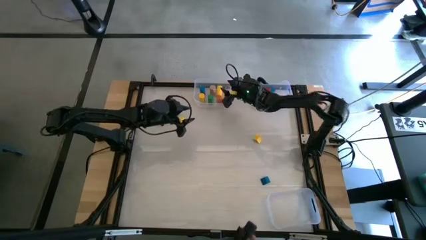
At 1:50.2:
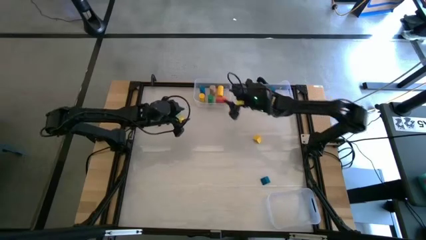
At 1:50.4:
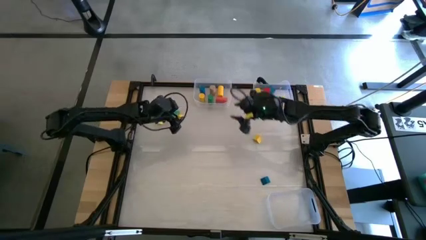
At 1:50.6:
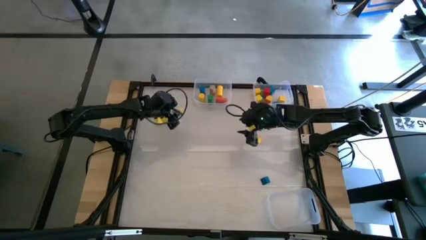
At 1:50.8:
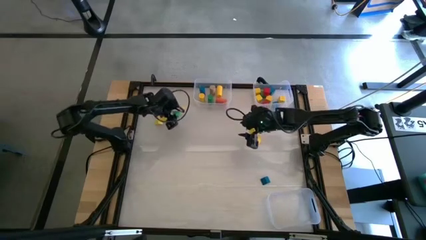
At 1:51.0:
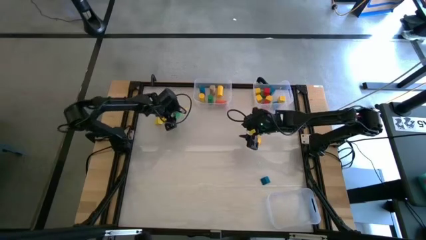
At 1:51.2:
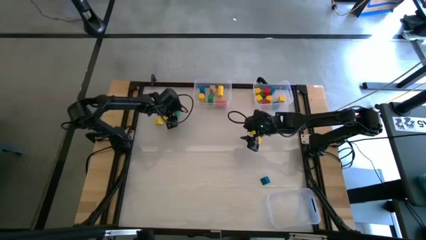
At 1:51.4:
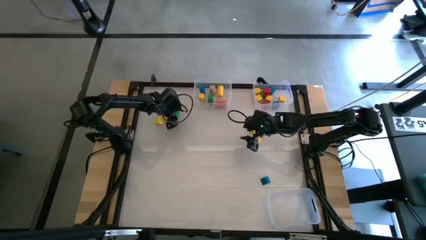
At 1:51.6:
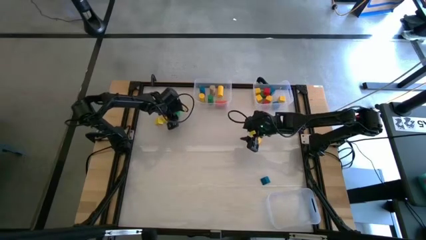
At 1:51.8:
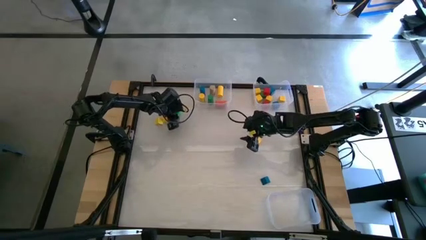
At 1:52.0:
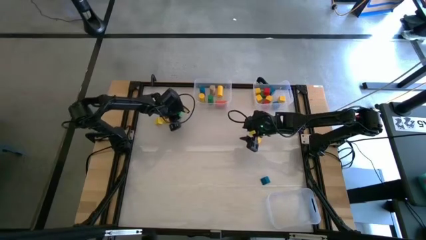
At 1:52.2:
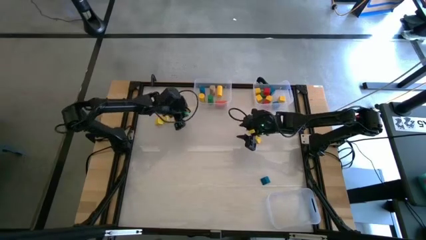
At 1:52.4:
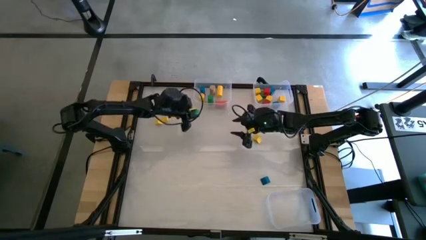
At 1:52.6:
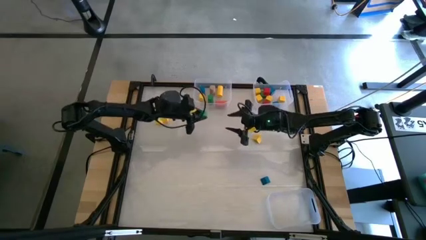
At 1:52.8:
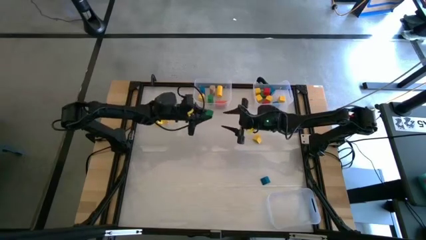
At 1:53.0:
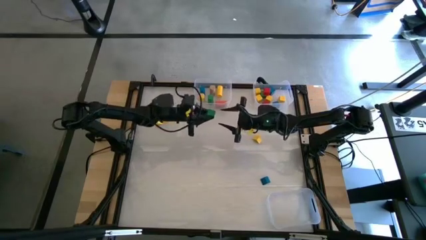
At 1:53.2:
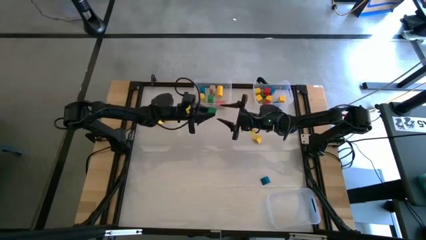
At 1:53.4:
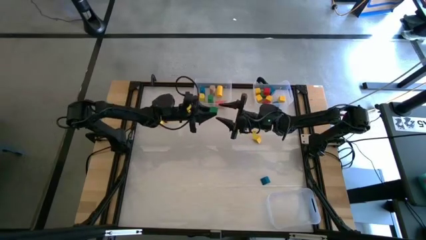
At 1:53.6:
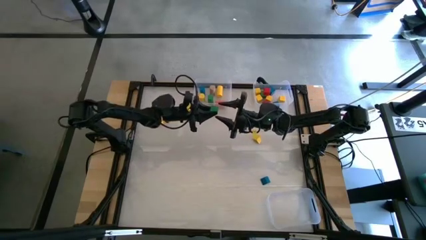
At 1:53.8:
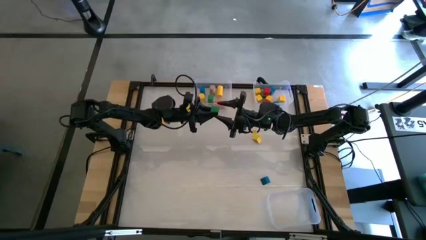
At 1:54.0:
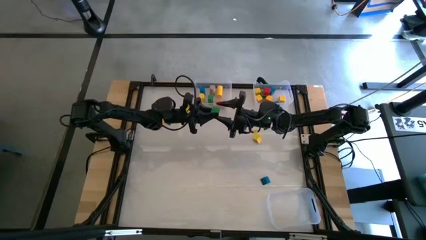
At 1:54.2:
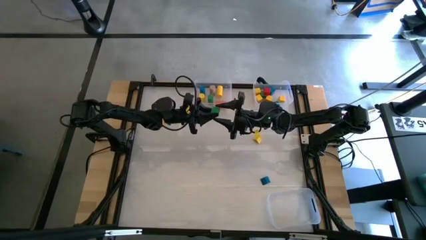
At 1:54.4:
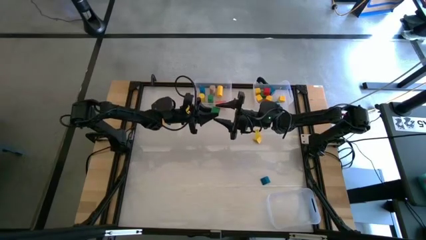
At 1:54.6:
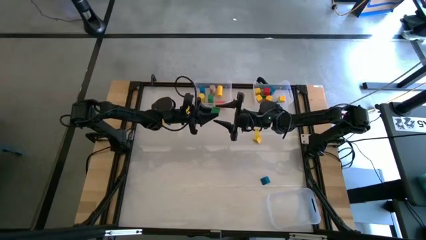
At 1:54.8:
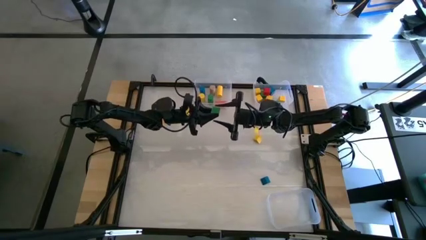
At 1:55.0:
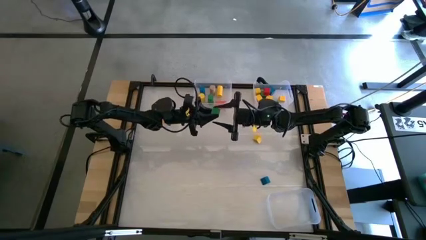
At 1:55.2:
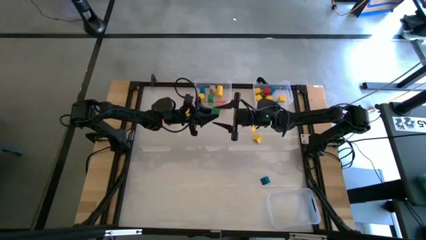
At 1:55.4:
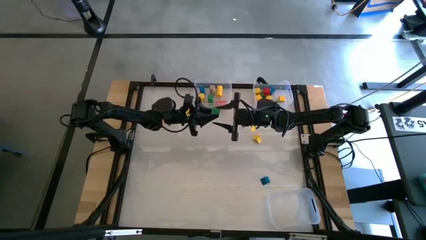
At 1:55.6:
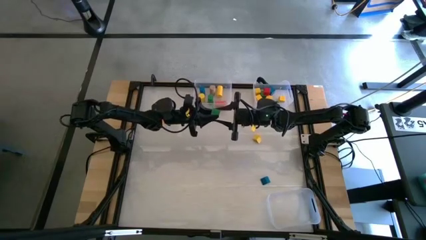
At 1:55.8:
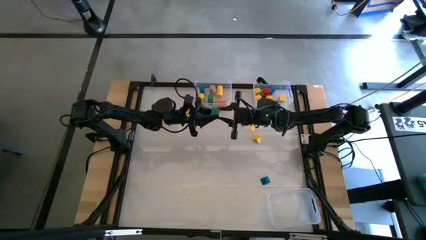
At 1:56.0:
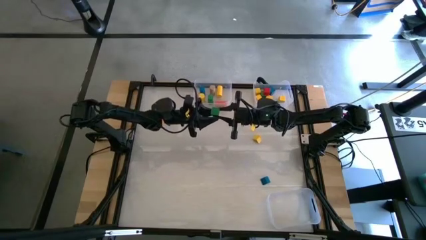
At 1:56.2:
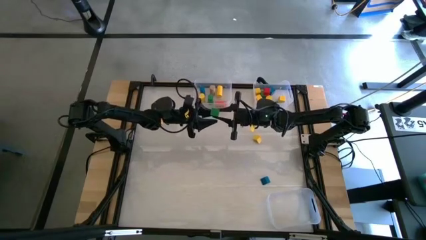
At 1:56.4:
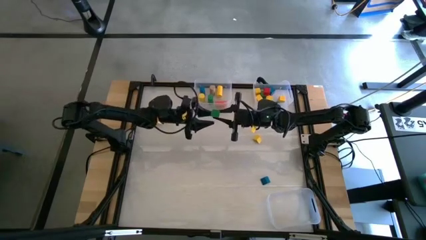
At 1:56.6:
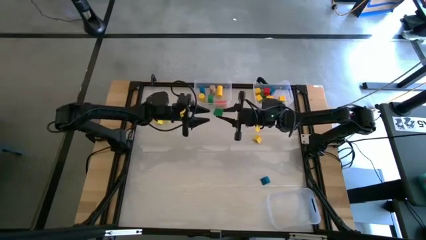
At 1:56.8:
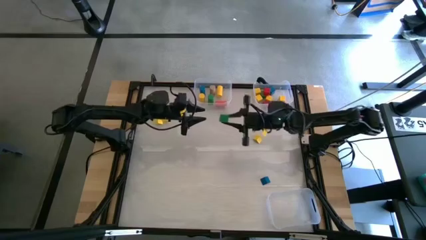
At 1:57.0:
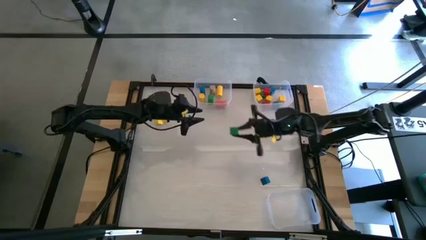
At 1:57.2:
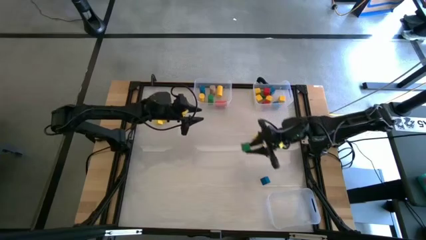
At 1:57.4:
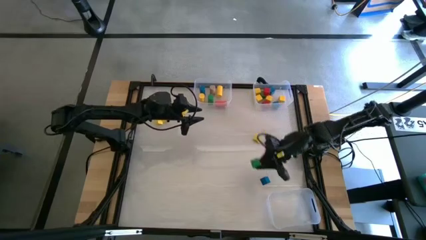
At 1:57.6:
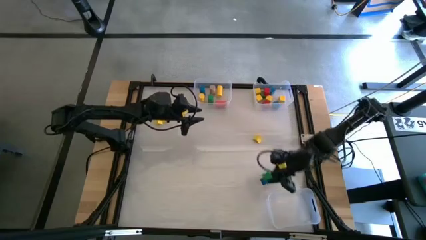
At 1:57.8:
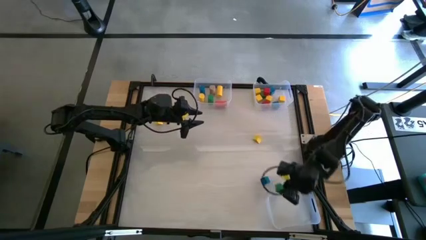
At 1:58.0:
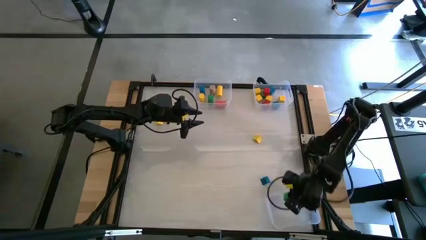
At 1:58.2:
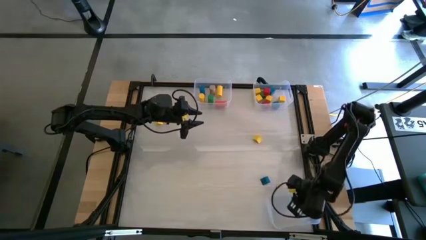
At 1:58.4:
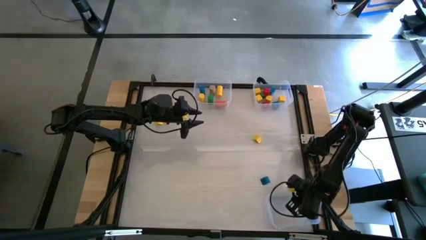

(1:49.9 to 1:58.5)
Task: Sort blocks by size
Put the green triangle block into the bottom transparent bin

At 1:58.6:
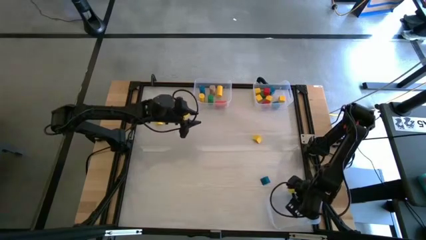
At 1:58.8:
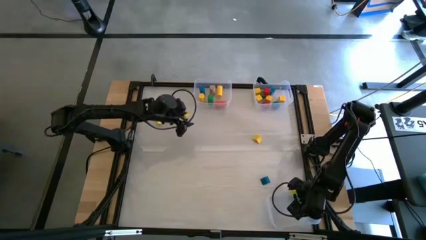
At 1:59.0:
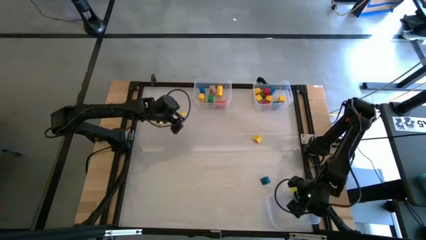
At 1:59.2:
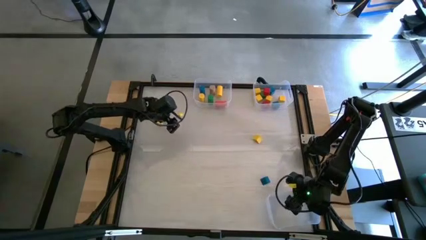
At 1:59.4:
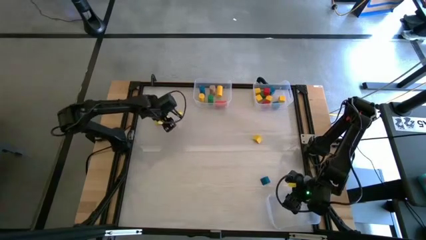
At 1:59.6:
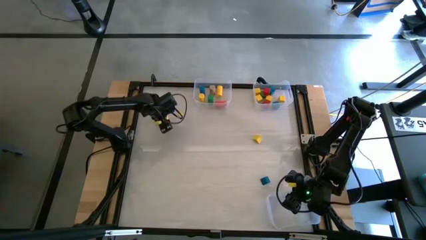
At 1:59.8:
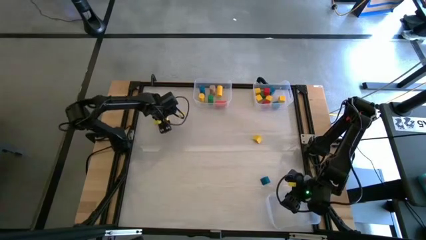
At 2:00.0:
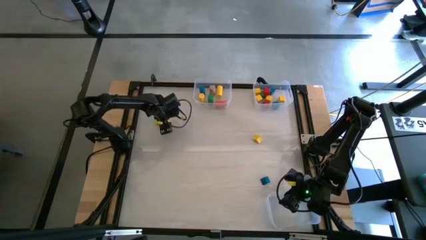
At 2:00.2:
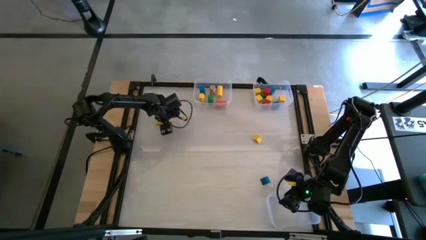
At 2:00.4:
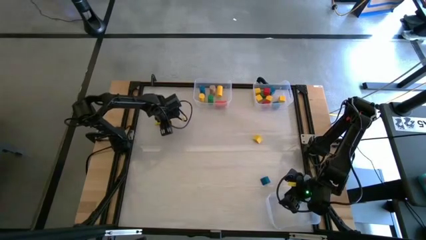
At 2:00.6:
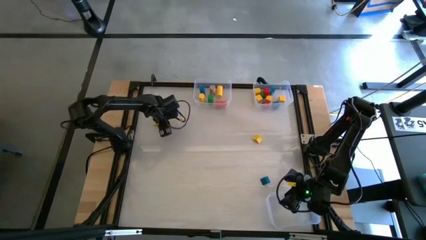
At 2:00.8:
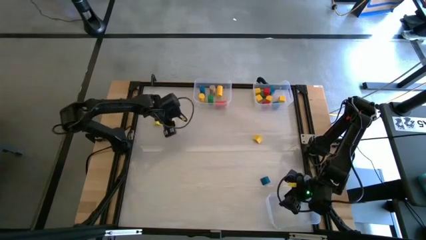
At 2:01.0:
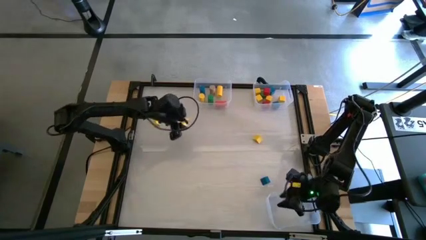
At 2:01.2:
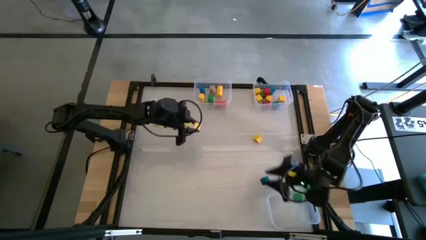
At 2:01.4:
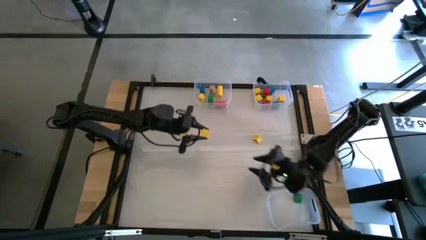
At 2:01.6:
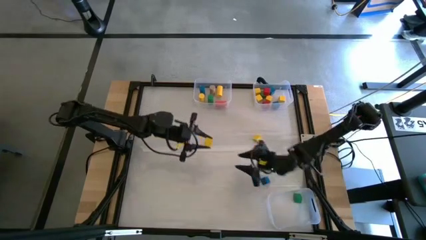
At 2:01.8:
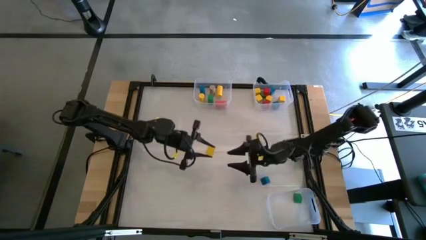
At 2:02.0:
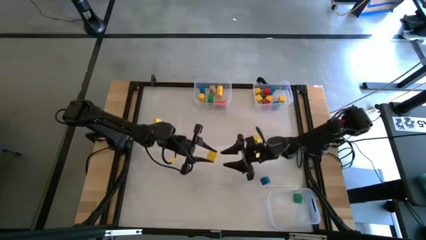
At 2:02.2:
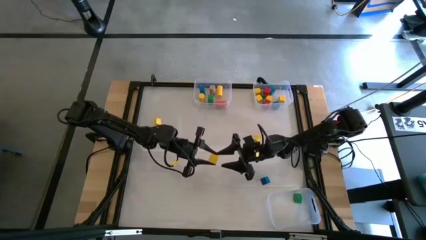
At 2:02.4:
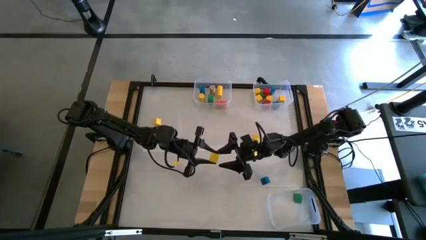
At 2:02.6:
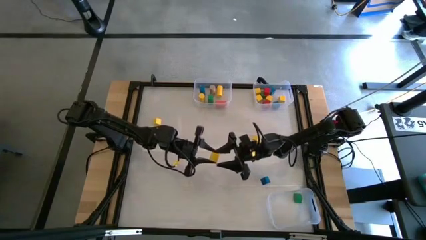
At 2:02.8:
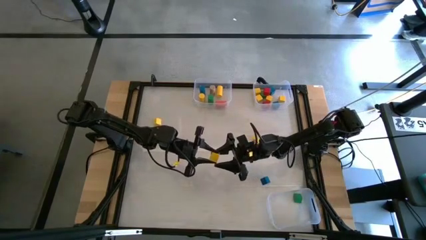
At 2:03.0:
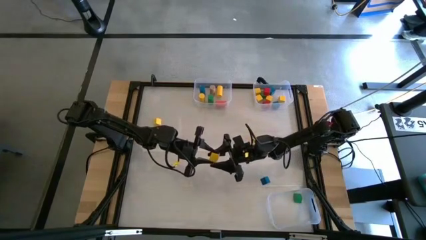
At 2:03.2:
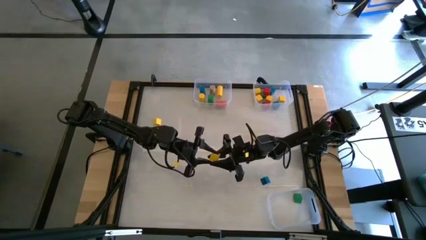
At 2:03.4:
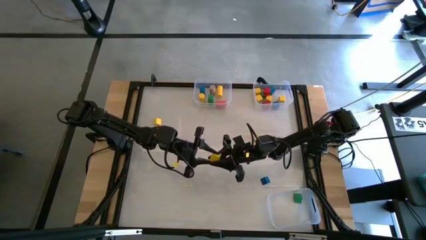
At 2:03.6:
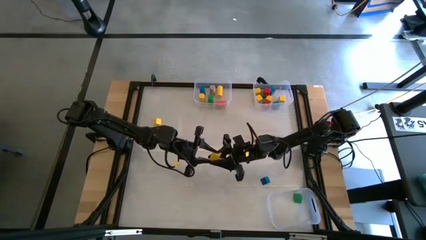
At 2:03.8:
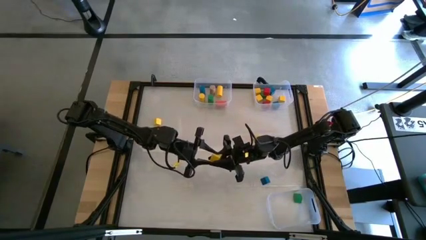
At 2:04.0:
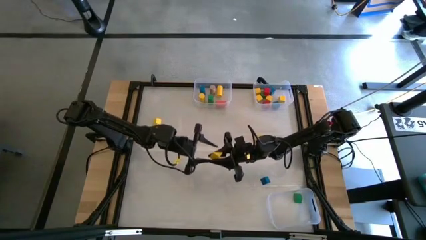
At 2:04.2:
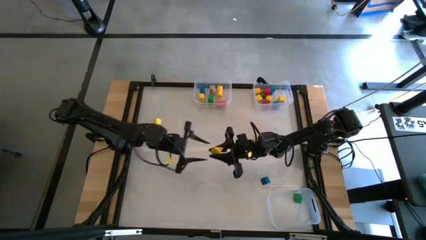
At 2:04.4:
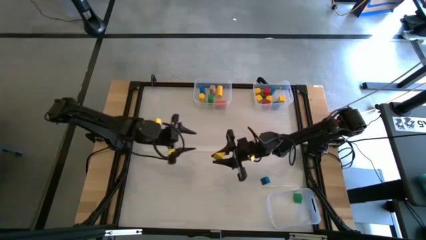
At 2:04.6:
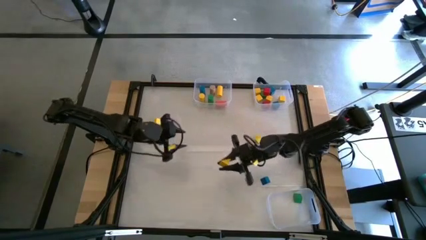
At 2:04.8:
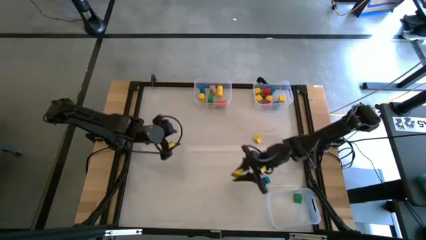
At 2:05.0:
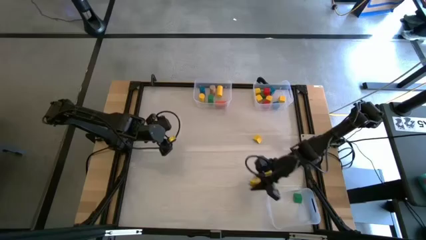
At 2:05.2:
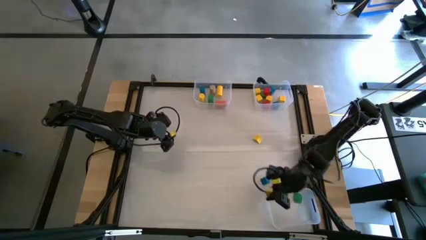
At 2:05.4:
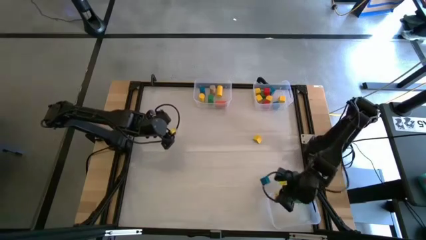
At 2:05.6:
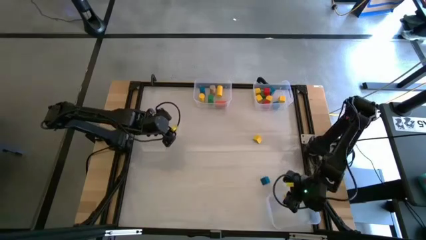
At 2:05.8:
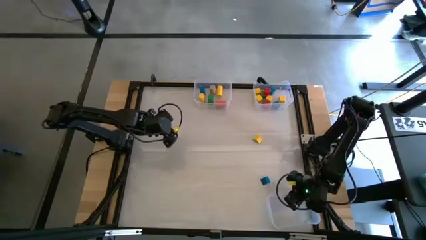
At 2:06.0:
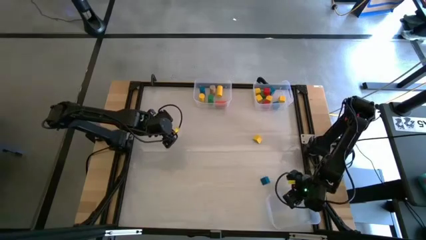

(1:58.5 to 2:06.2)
Put the yellow triangle block into the bottom transparent bin
